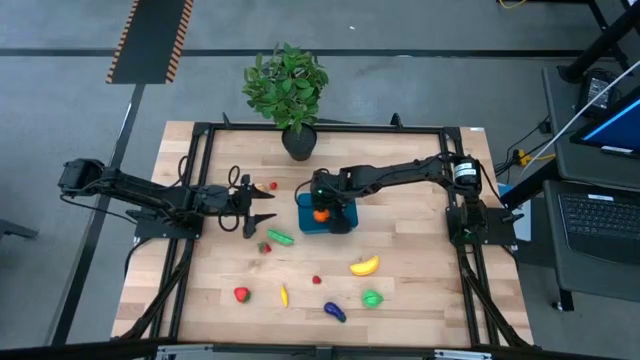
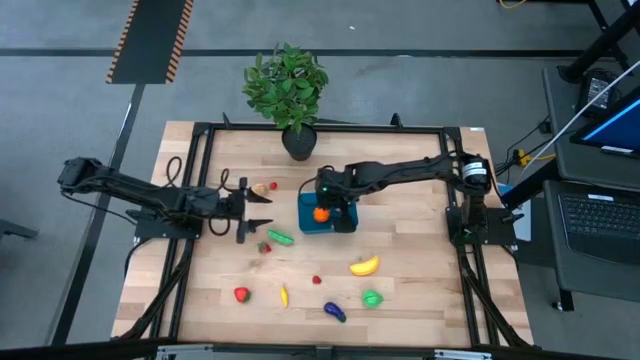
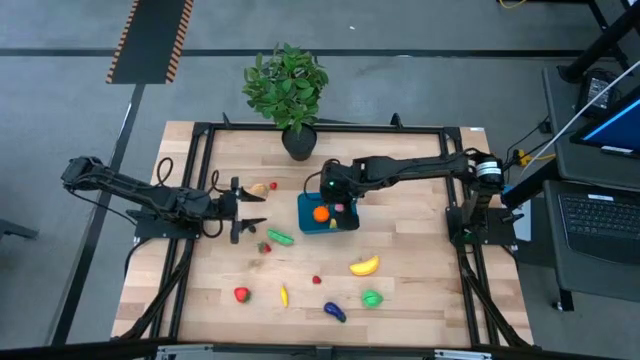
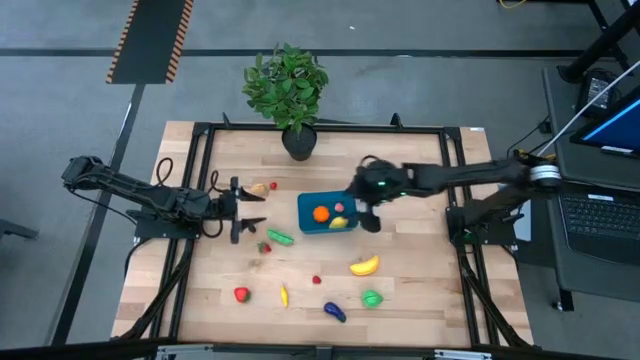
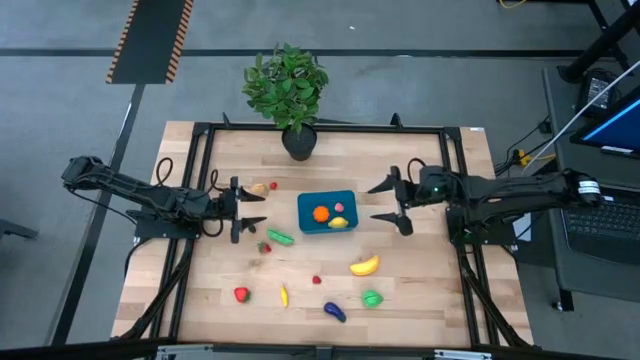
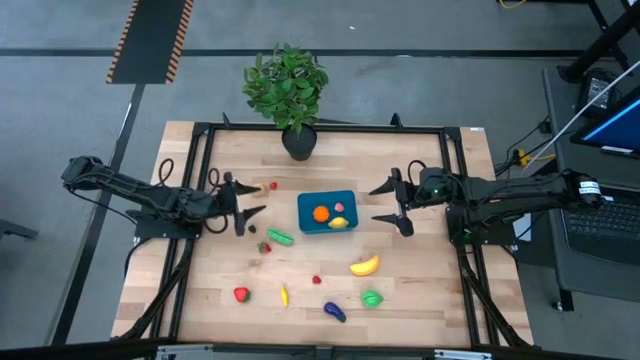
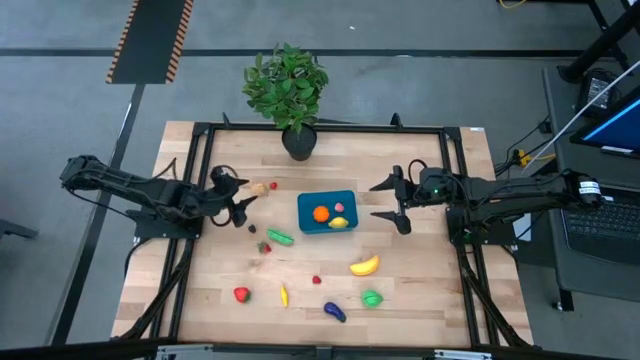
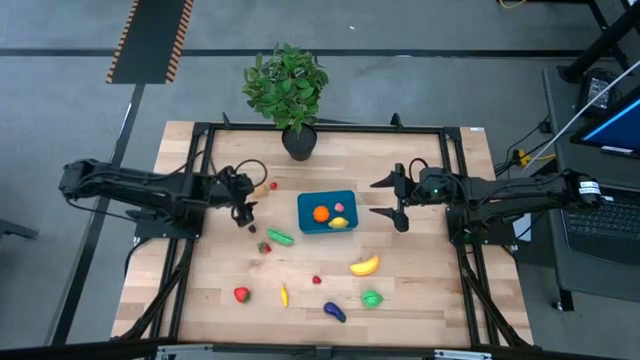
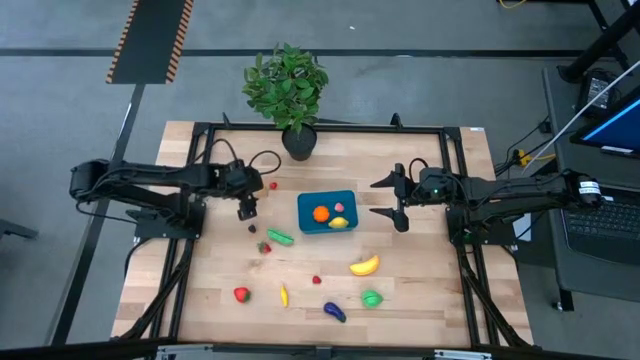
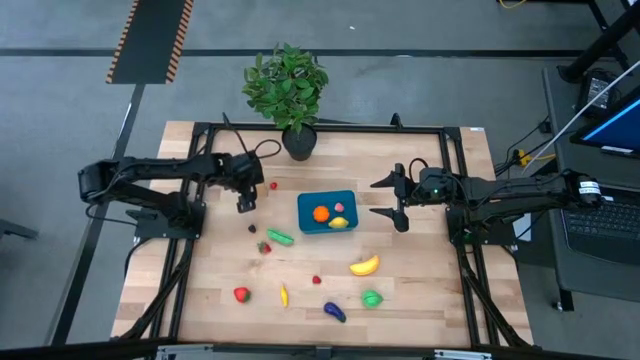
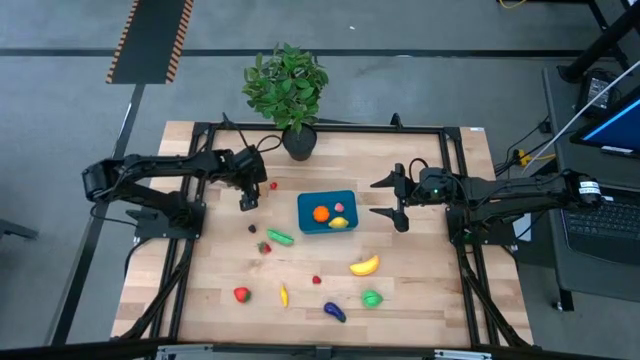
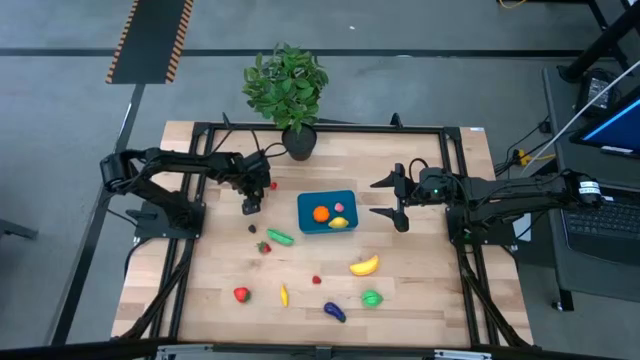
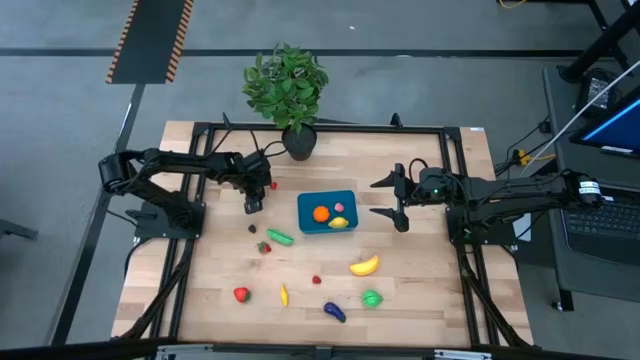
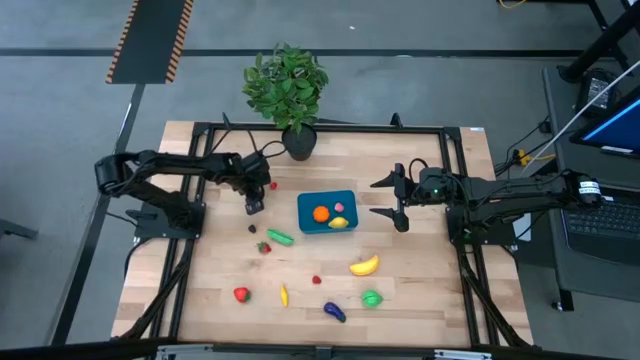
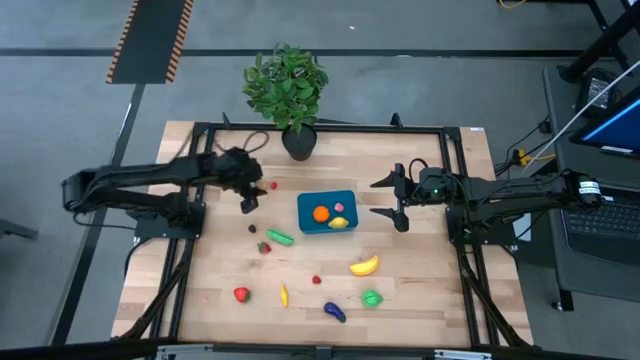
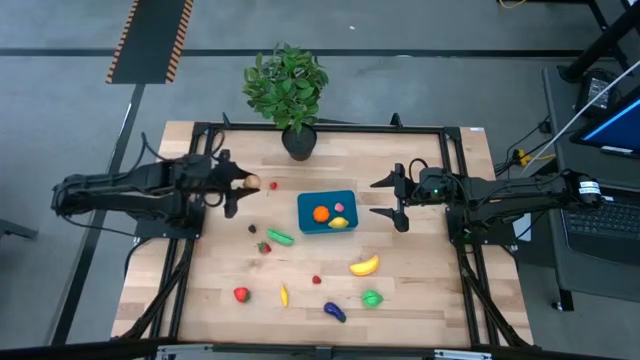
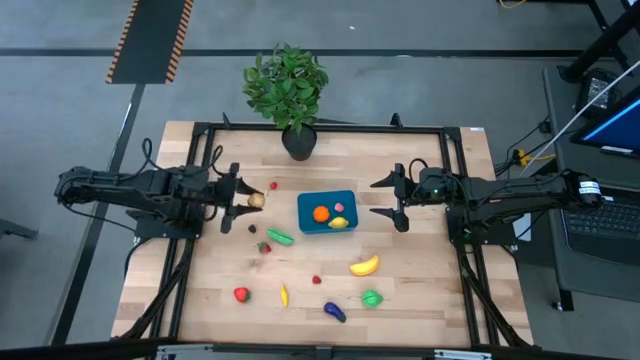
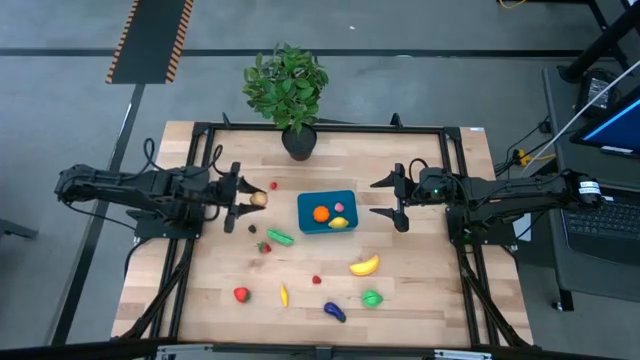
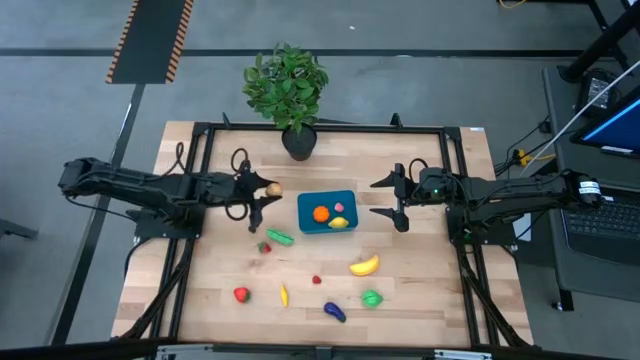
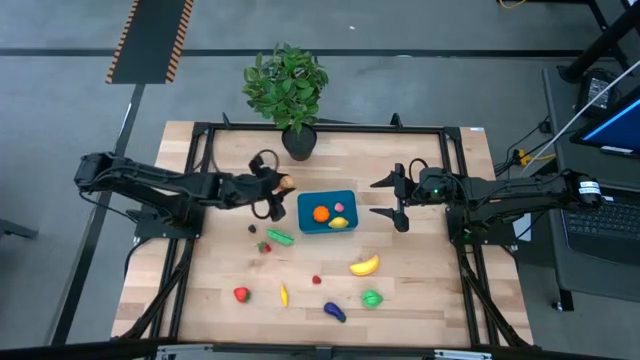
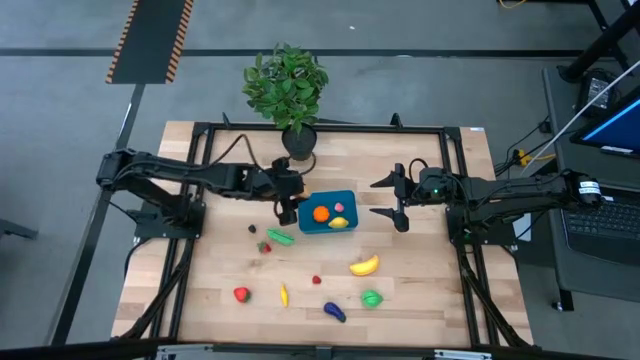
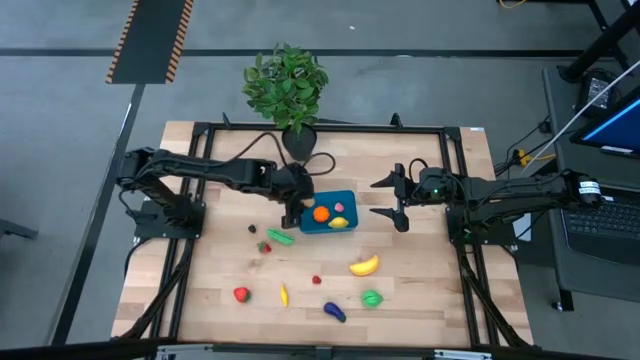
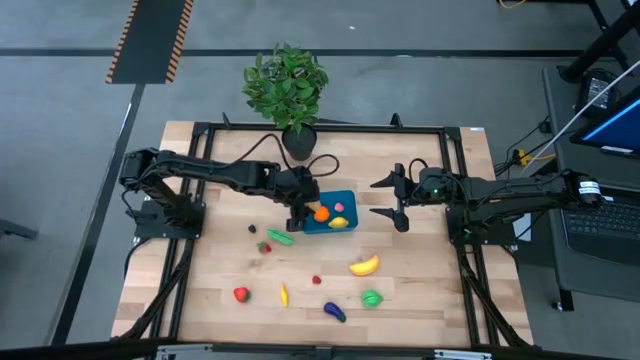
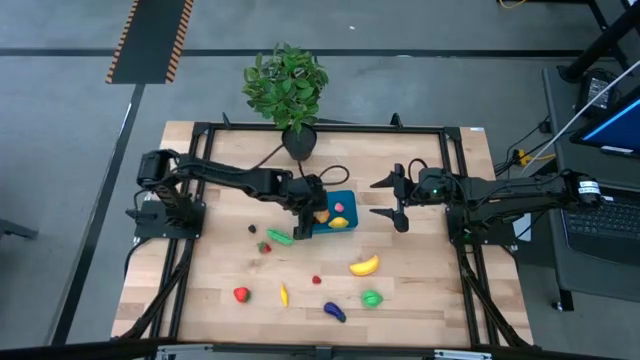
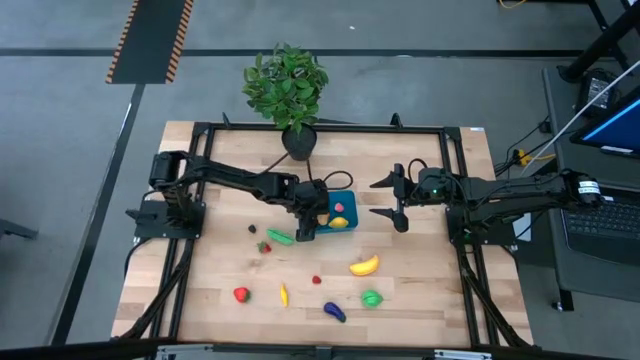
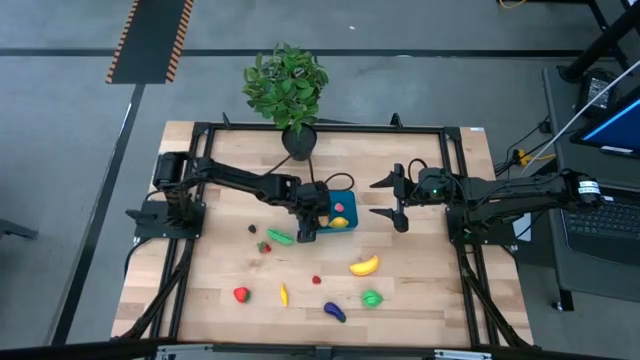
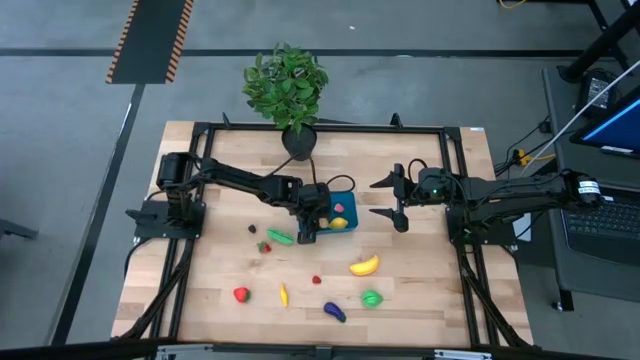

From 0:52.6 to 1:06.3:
Task: Pick and placing Produce into tupperware
Put the brown potato into the blue bin

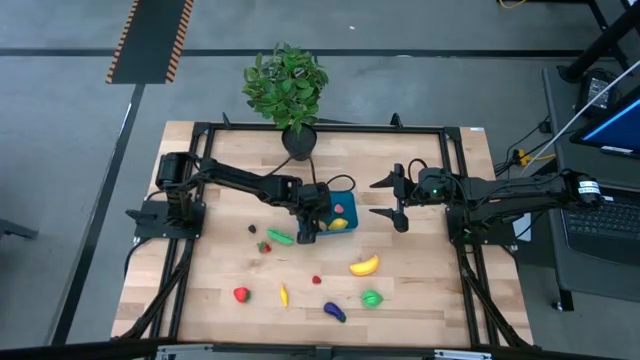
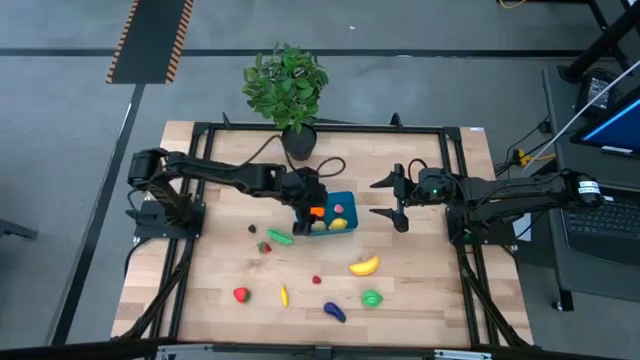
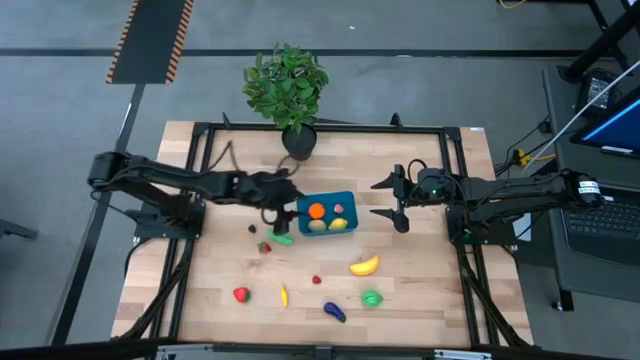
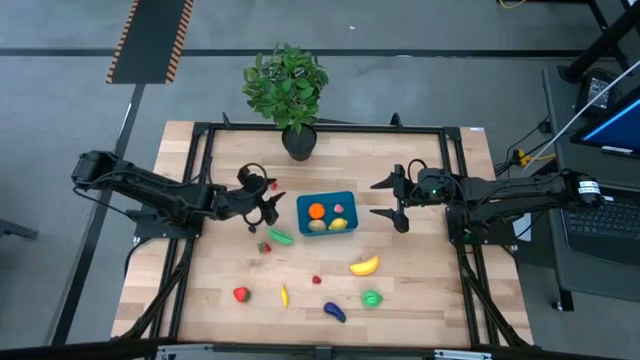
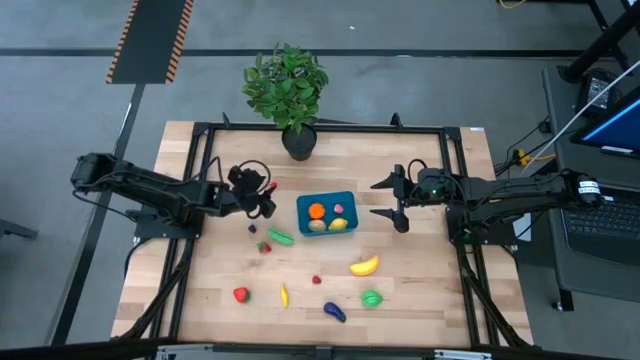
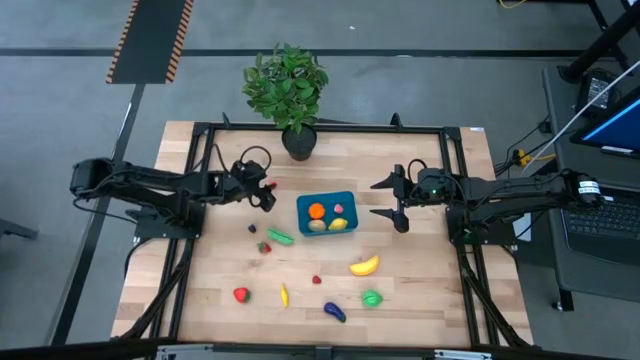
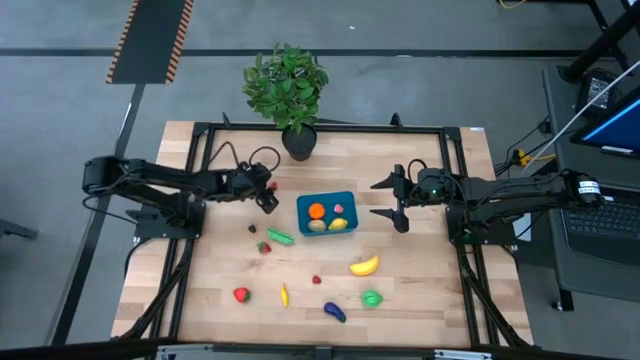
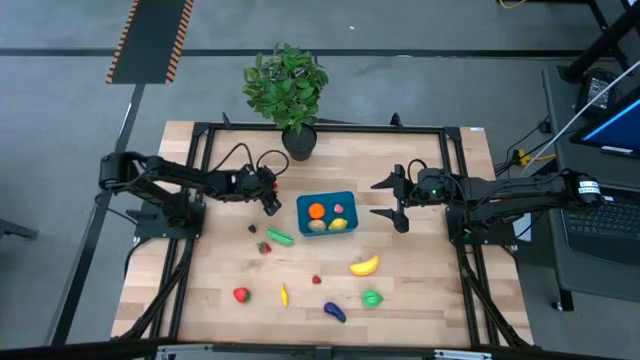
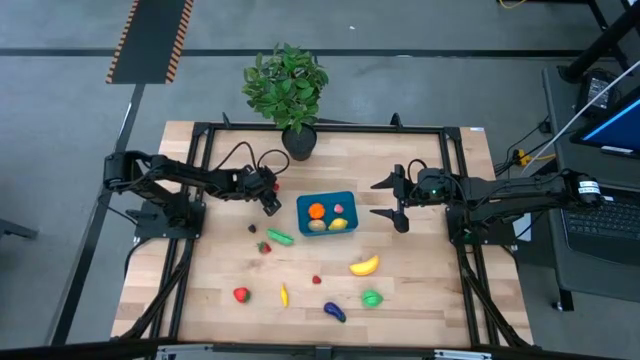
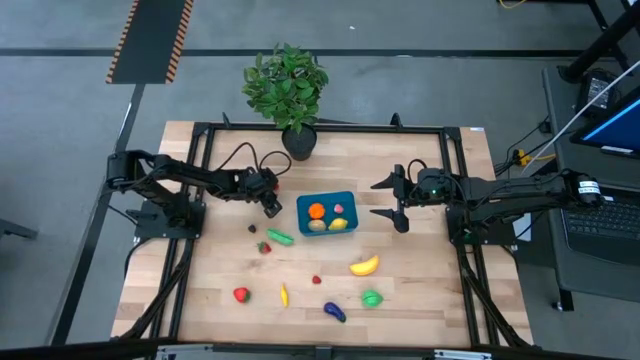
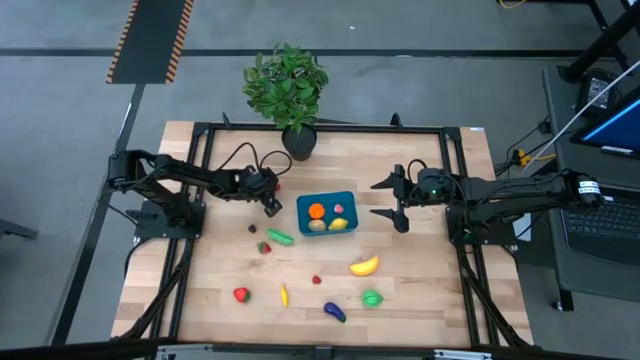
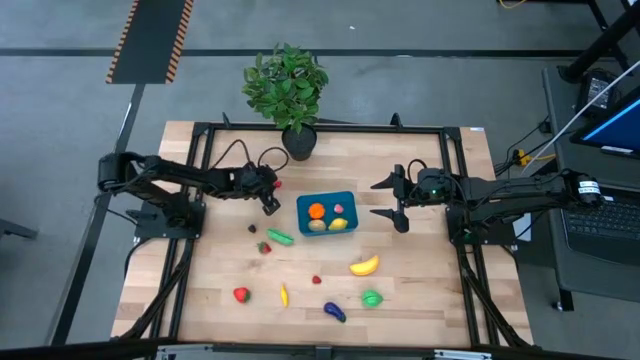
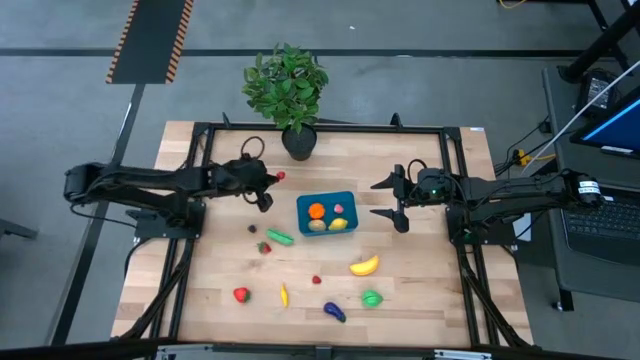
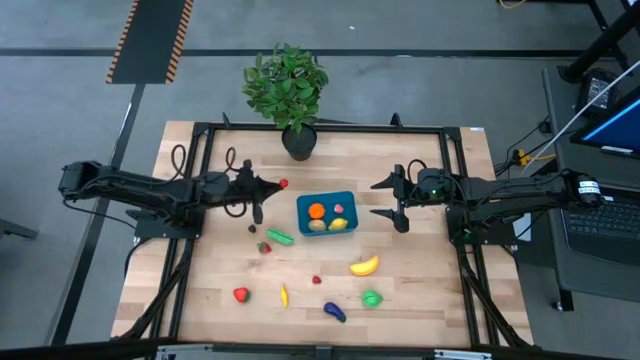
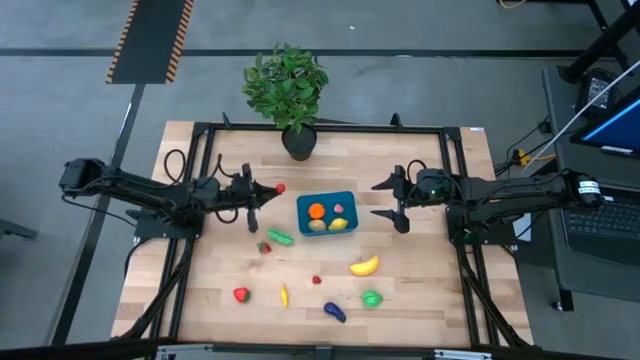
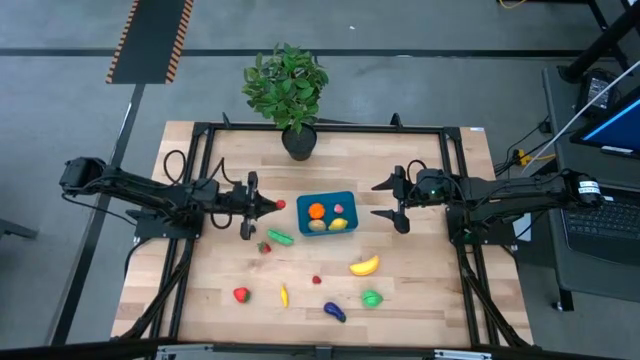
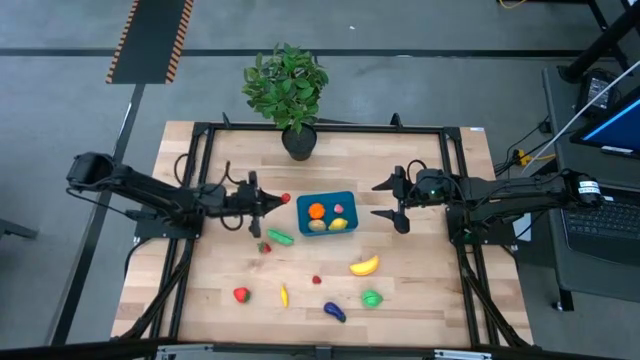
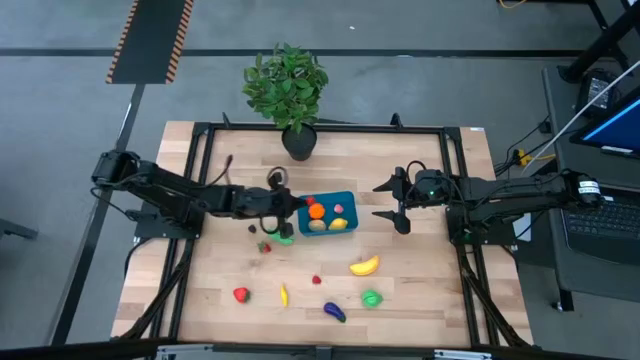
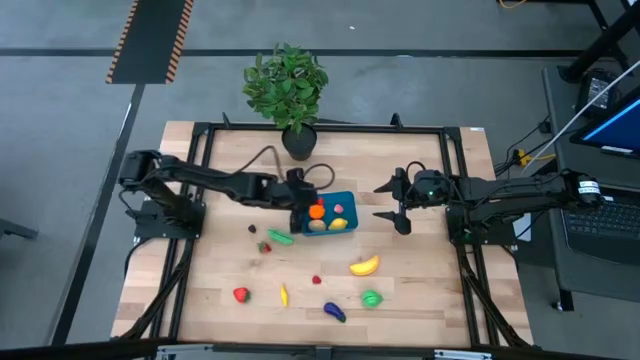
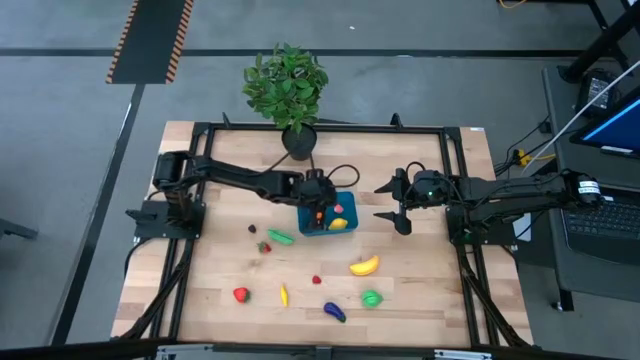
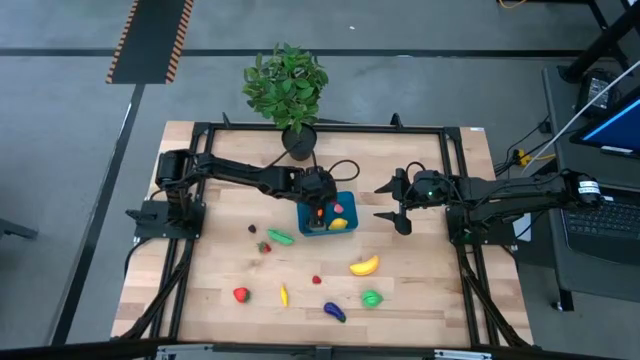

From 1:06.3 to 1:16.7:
Put the red cherry into the blue bin
